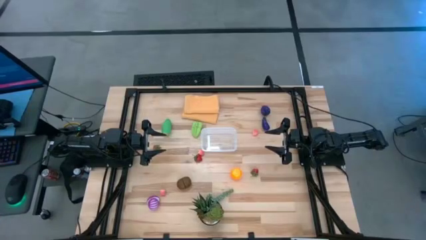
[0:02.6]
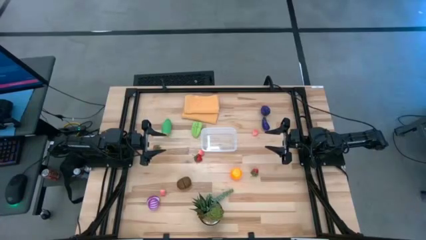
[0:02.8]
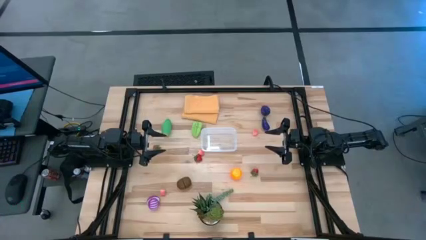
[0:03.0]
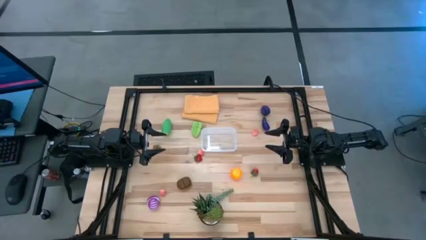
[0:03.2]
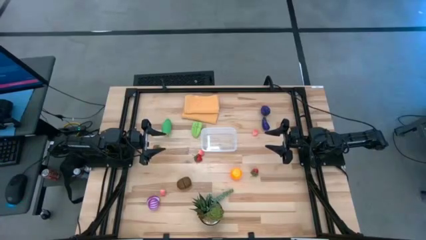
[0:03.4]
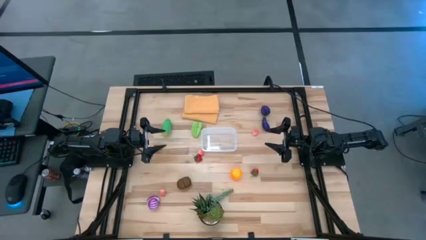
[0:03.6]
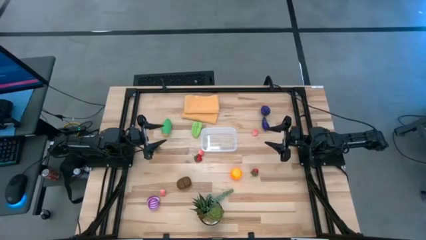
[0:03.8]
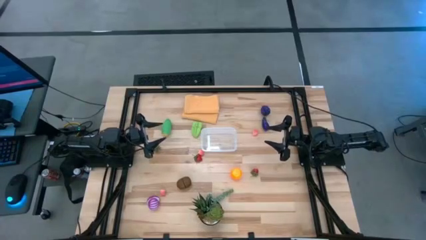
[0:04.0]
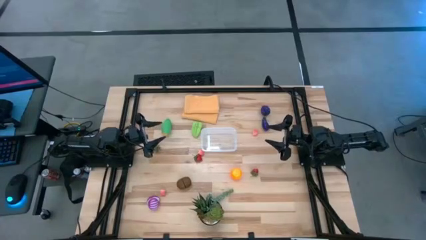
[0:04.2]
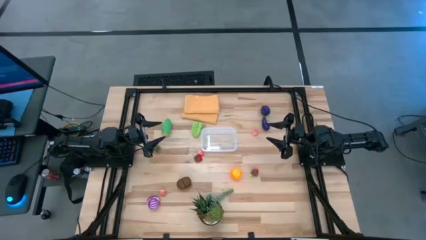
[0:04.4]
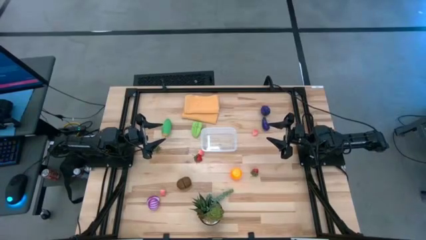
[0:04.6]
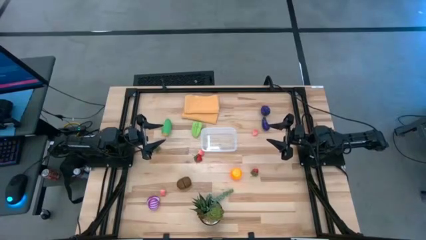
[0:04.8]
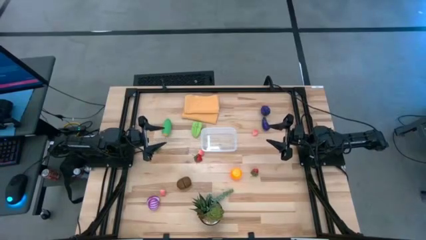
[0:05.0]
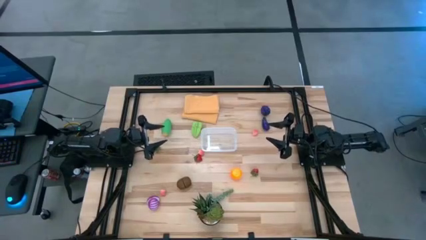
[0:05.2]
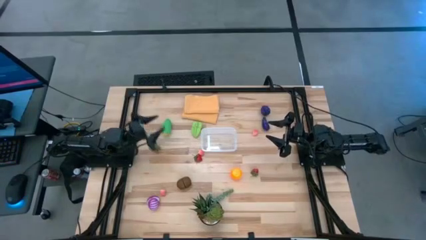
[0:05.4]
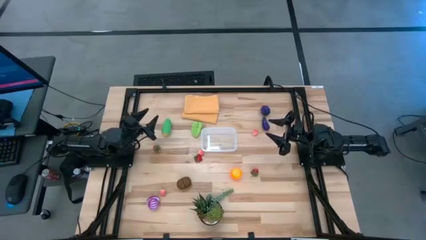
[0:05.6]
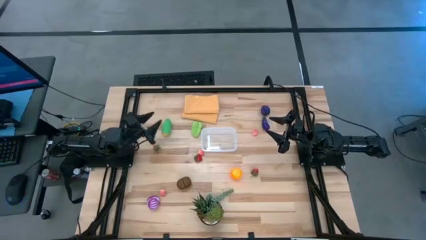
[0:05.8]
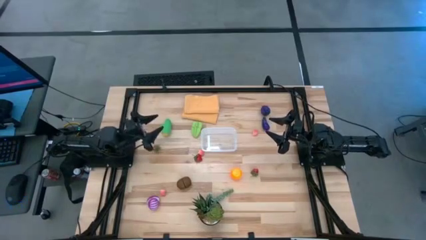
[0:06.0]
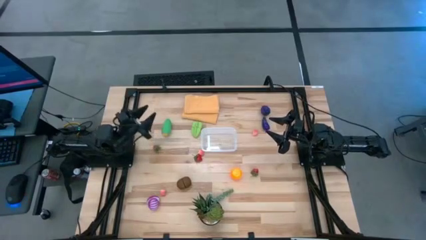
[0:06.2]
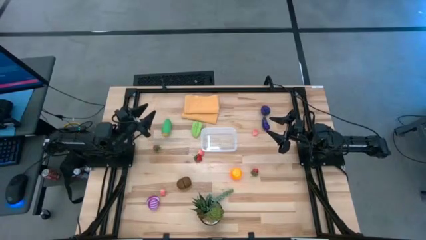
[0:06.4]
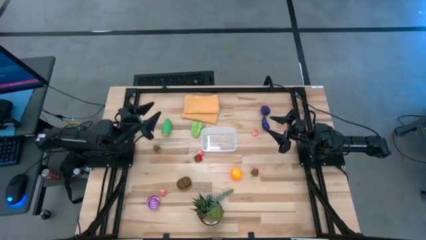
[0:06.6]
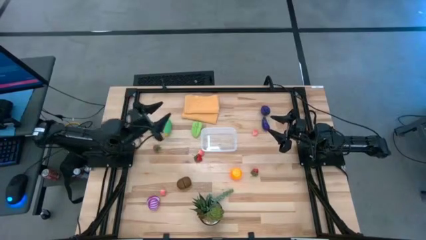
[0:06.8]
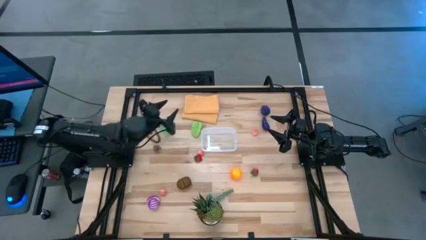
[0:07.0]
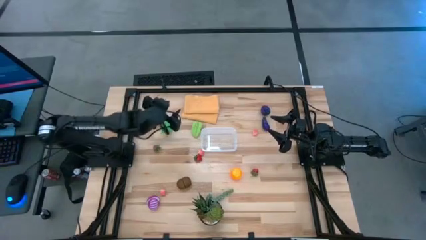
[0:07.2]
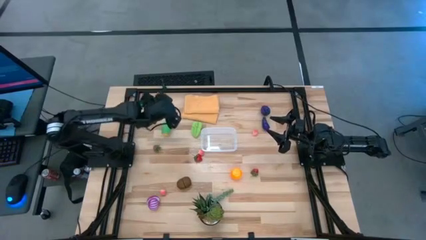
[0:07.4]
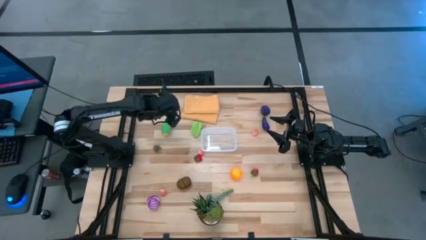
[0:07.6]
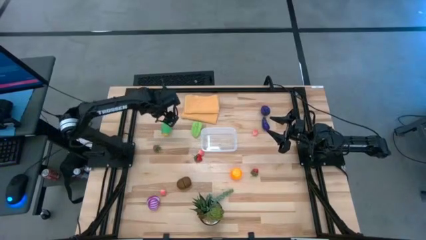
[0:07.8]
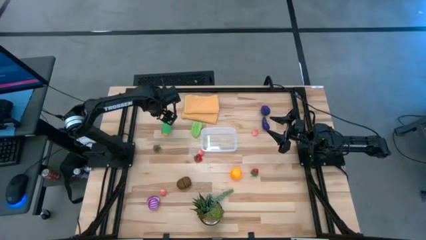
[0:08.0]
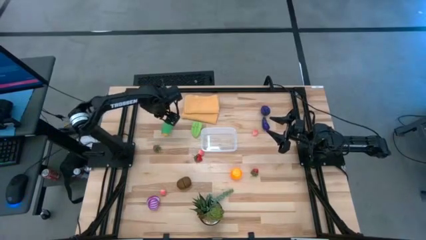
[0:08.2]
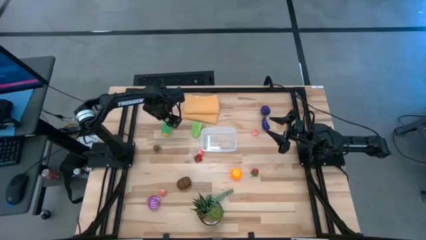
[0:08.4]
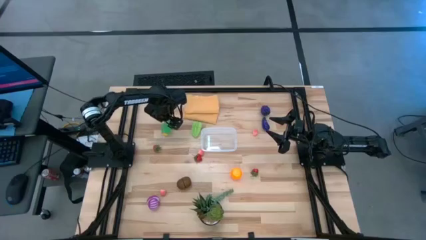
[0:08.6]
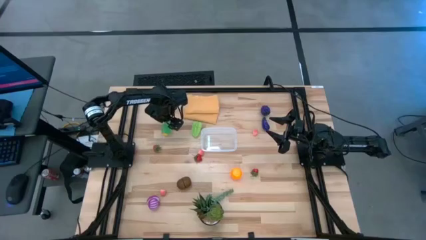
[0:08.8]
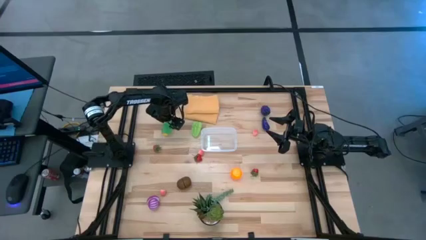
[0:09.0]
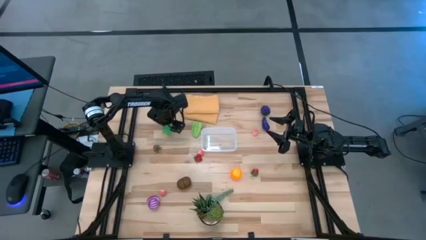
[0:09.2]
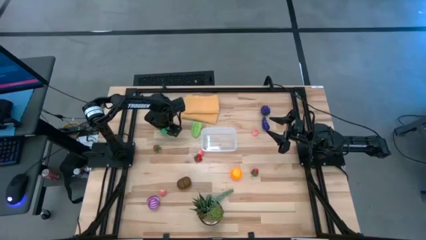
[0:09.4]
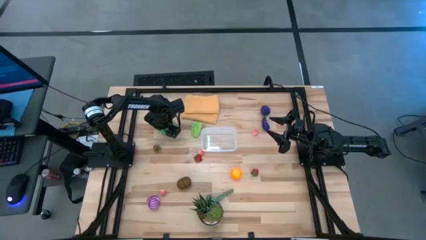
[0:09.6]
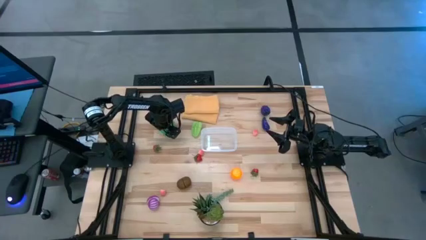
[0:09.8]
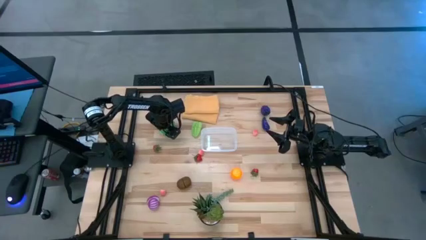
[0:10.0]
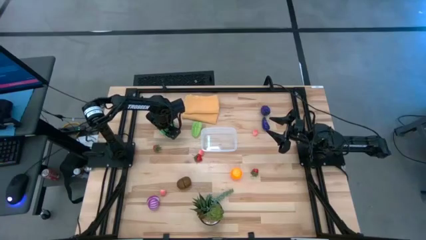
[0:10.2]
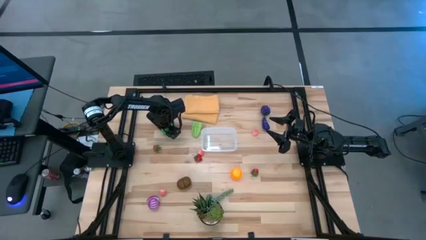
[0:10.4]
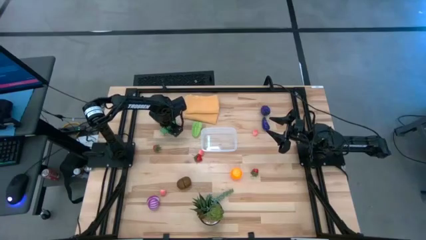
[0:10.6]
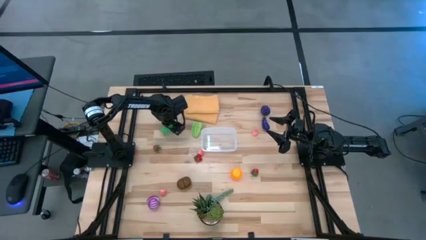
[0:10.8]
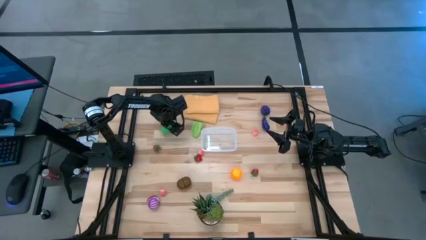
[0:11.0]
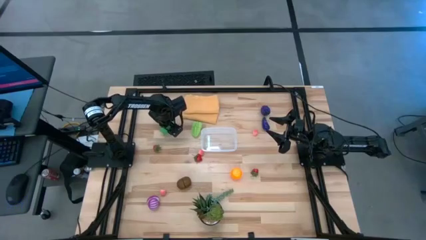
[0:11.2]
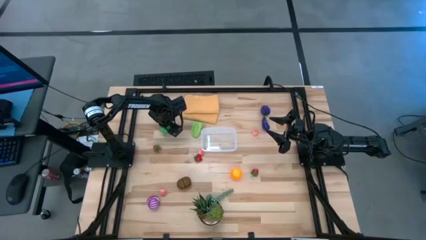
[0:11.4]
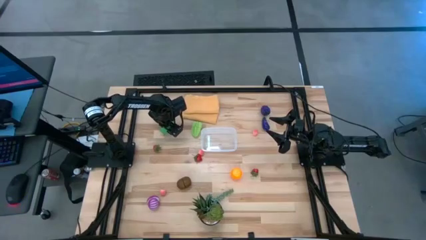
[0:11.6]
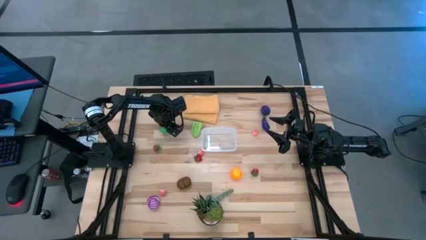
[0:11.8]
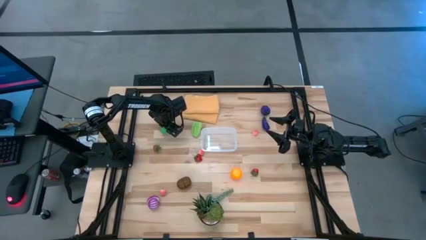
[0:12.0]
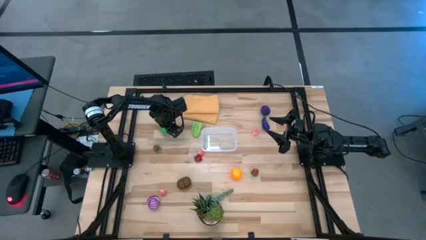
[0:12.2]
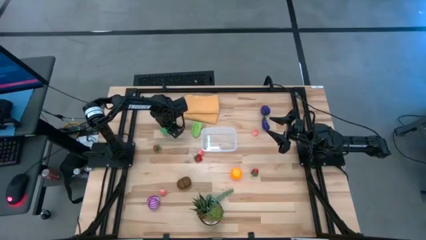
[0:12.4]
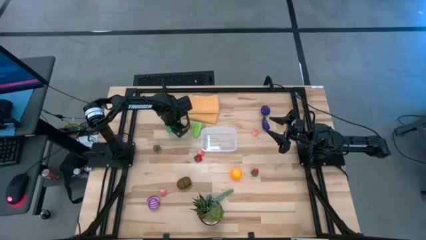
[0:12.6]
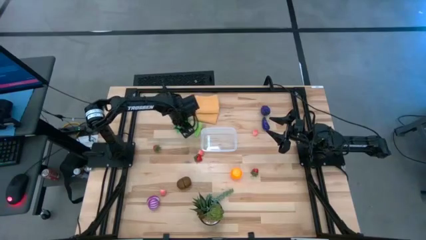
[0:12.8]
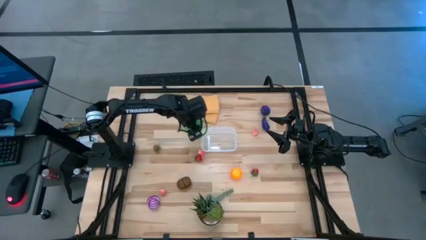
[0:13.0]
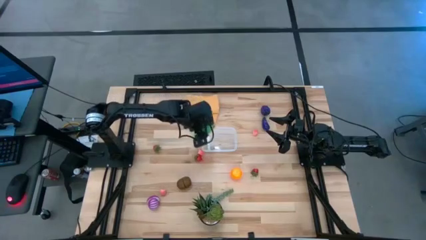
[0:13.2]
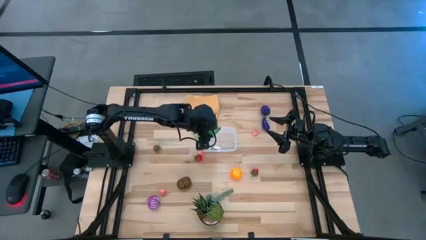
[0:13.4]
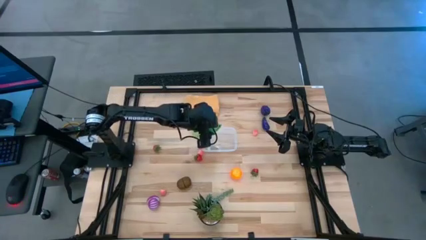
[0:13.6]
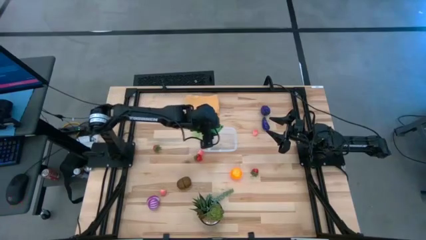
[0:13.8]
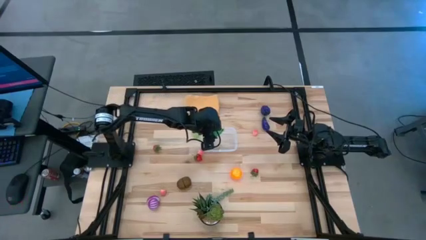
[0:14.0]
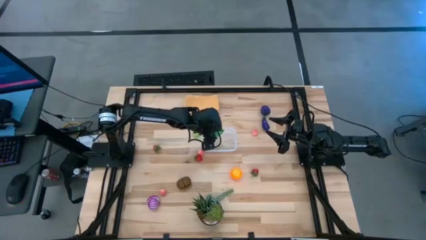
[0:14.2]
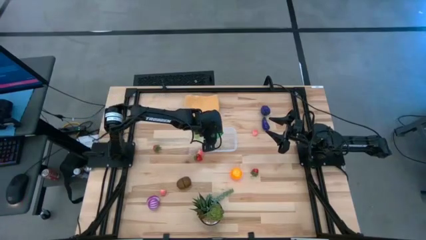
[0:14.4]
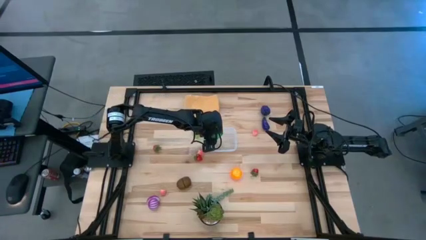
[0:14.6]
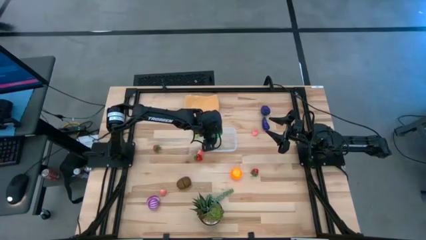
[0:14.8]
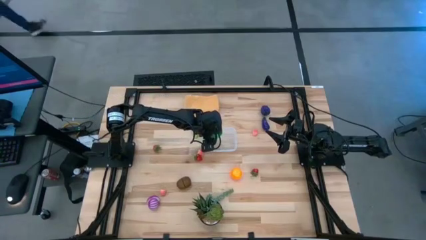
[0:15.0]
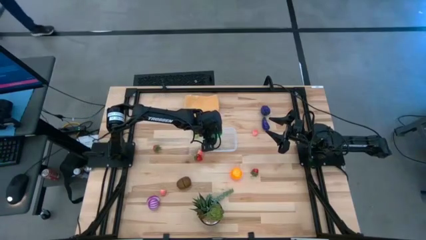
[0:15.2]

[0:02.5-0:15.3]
Task: Pick and placing Produce into tupperware
Put the green corn into the transparent container
